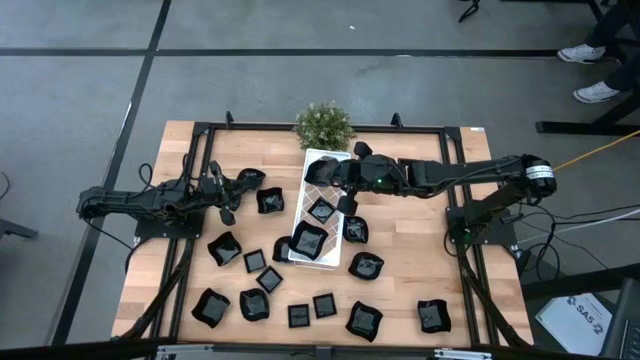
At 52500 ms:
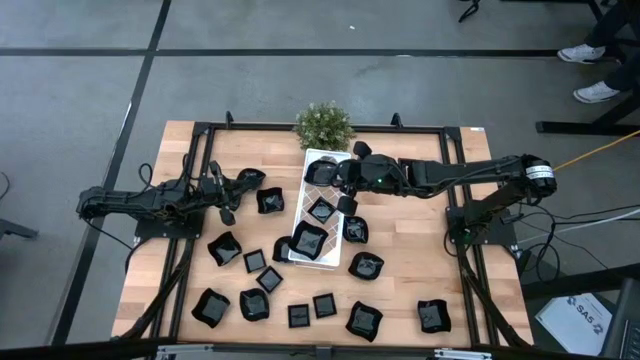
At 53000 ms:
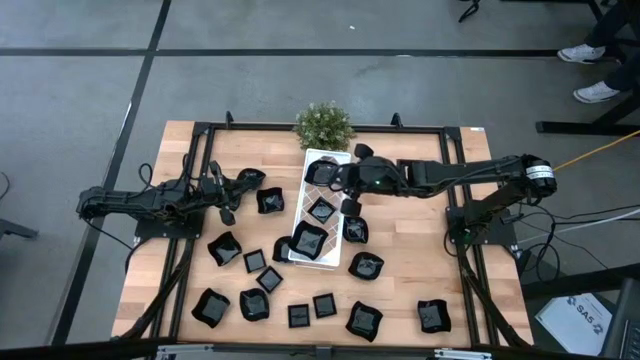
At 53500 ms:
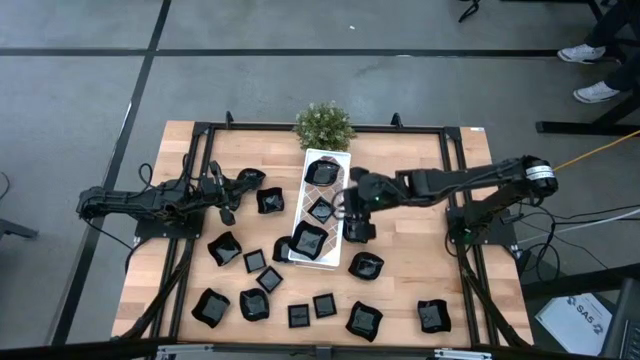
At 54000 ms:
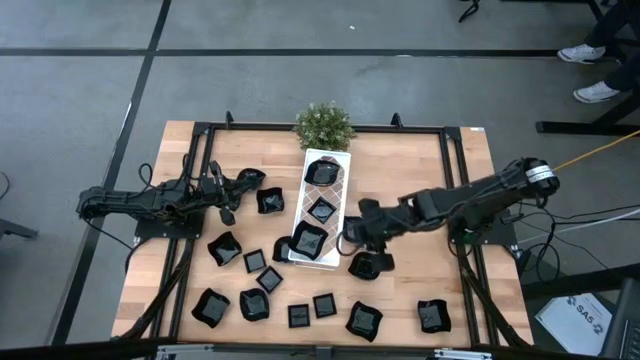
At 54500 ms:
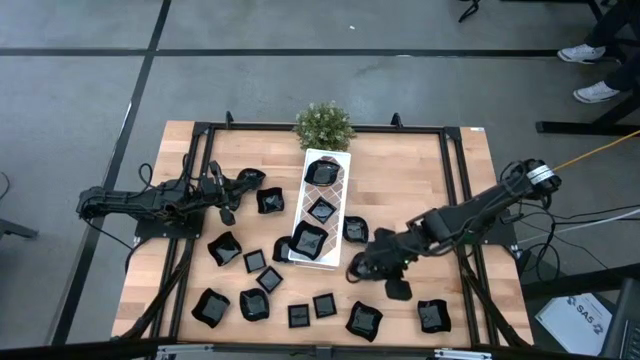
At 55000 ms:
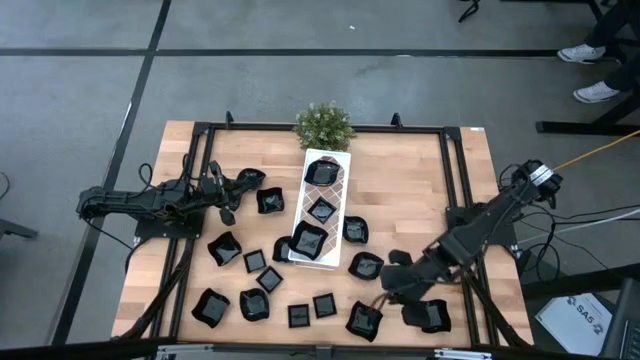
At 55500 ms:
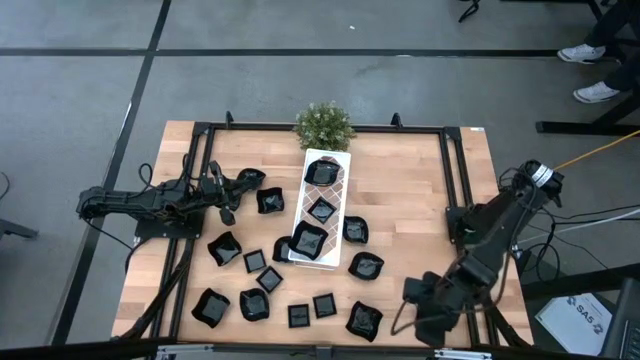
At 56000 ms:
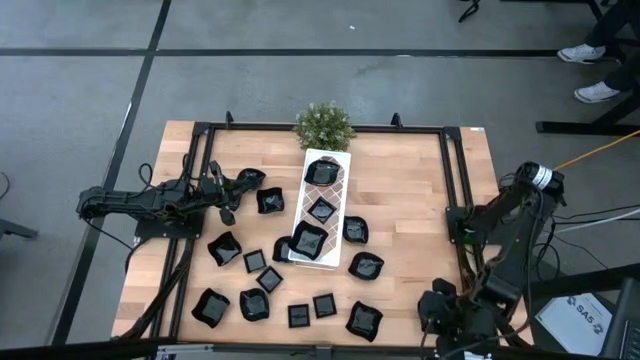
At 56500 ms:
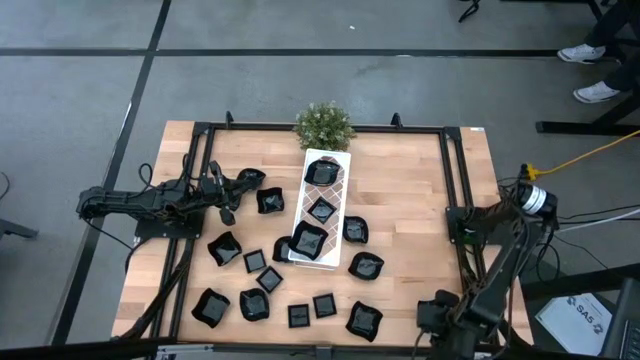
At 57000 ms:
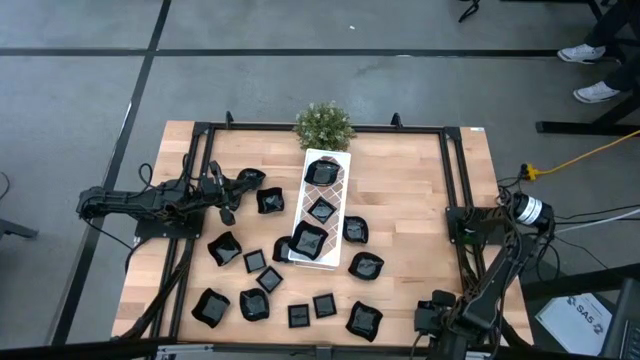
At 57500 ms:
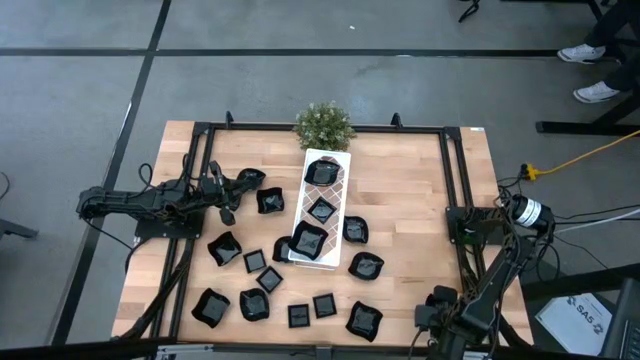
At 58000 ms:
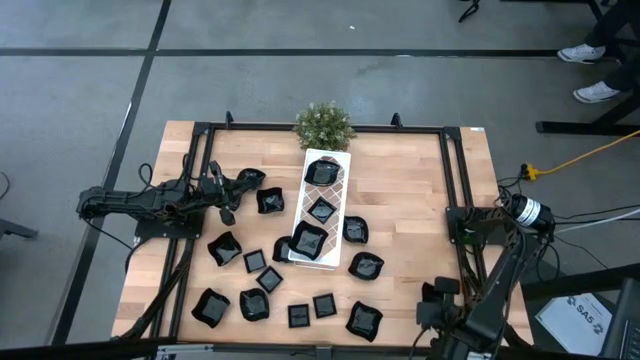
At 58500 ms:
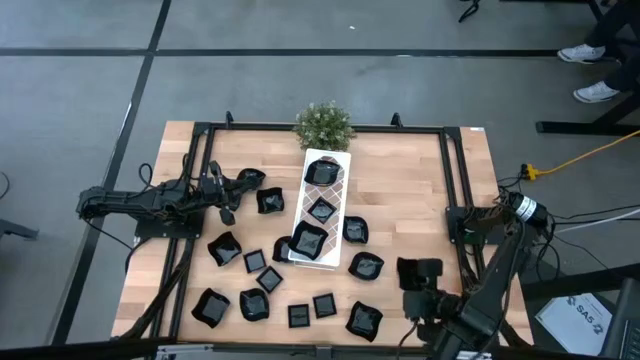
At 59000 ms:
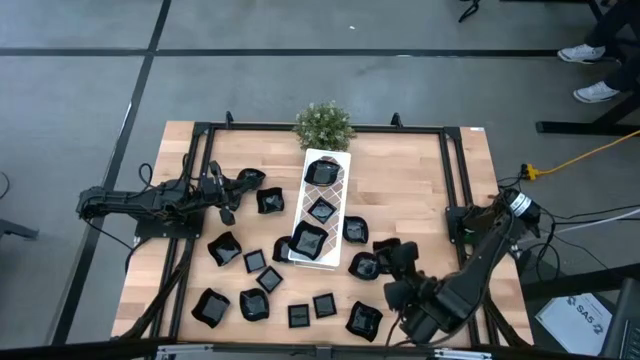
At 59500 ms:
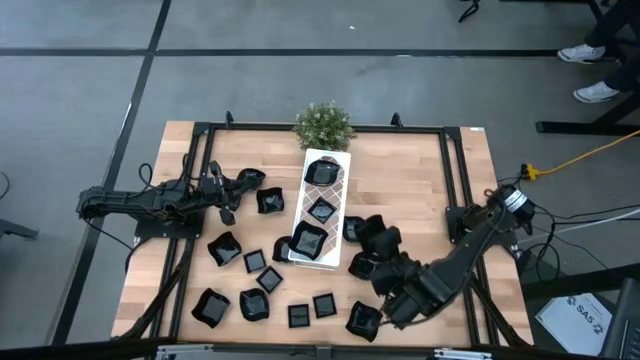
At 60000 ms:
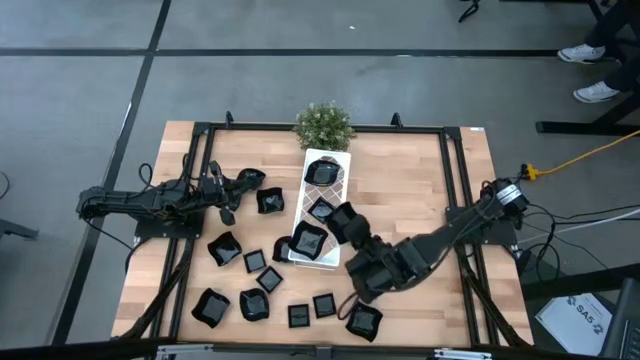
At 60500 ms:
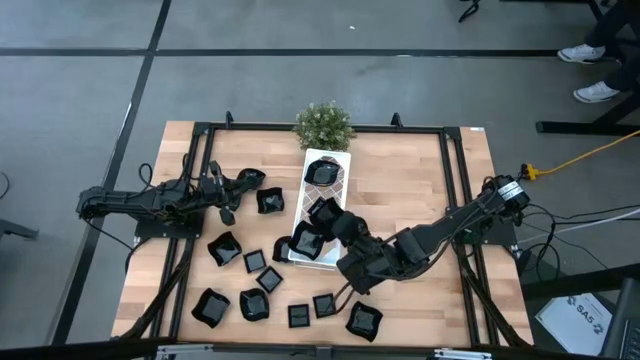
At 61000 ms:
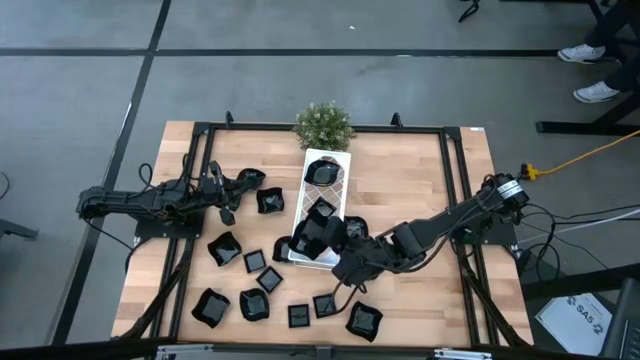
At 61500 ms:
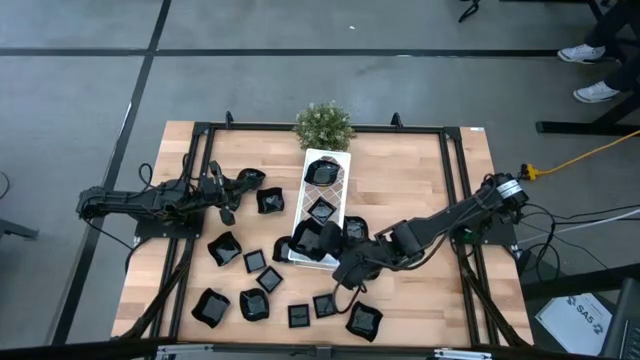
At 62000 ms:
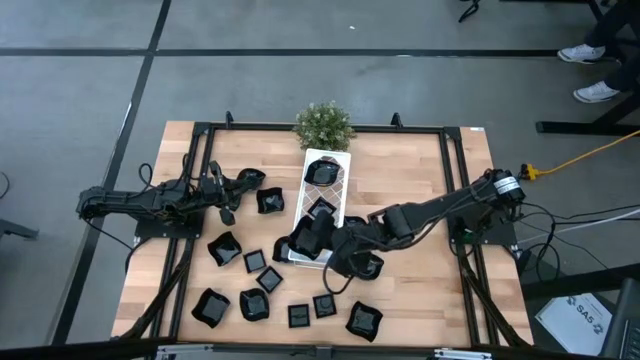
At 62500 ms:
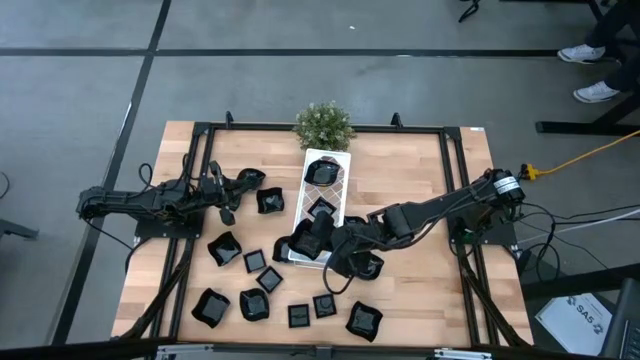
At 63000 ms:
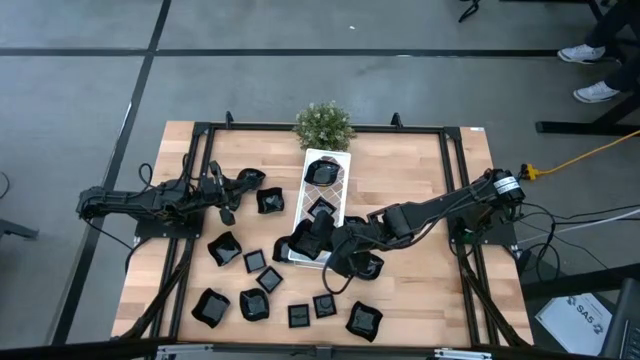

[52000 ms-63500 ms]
Task: Pick & Place Mini shaped plates
Stack the distorted square plate on top of the distorted square plate on the shelf

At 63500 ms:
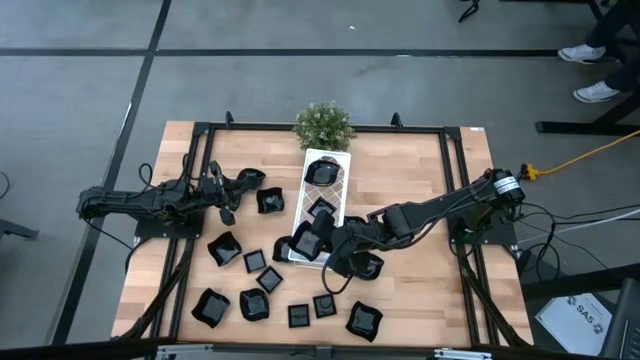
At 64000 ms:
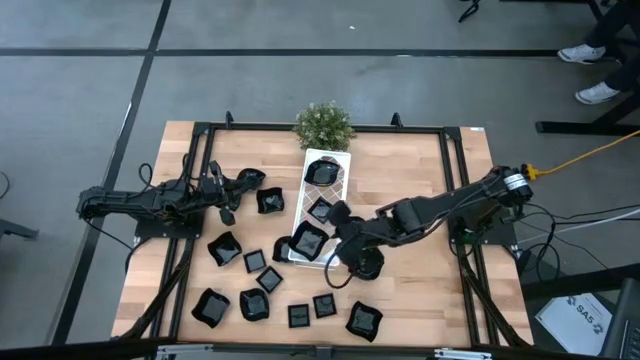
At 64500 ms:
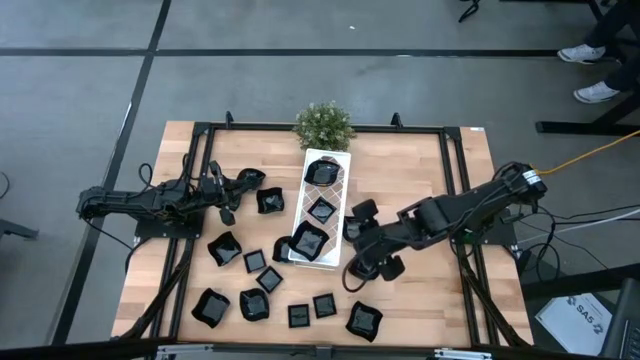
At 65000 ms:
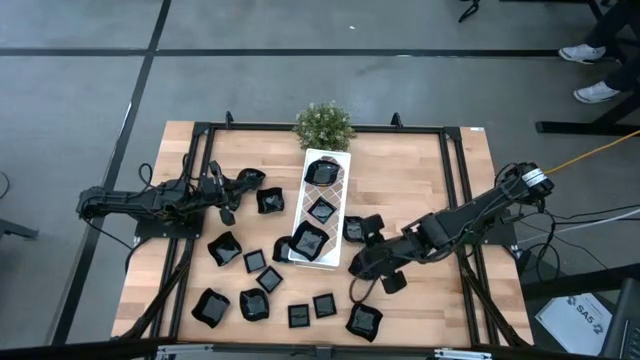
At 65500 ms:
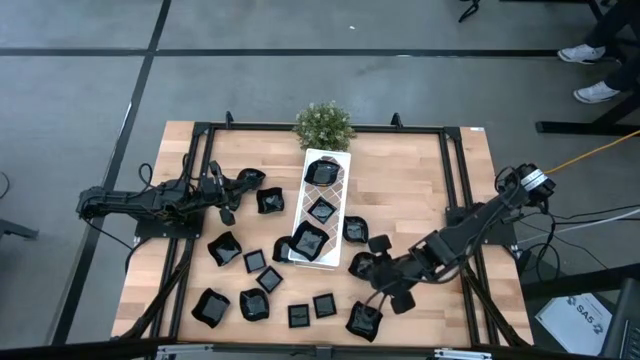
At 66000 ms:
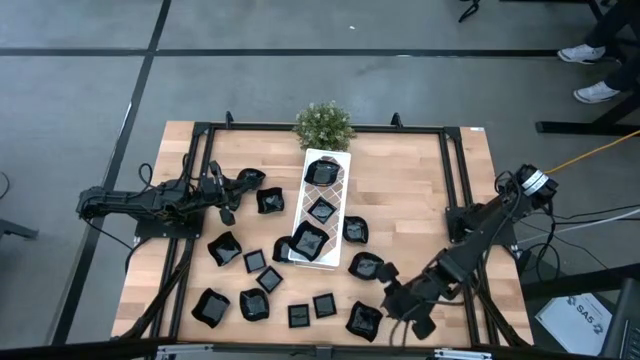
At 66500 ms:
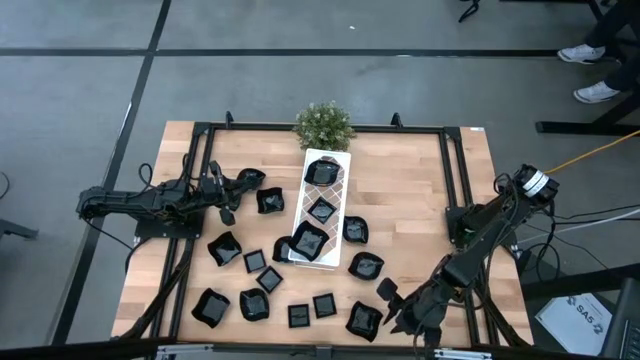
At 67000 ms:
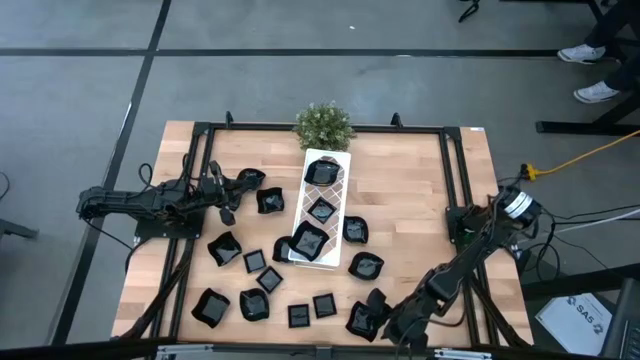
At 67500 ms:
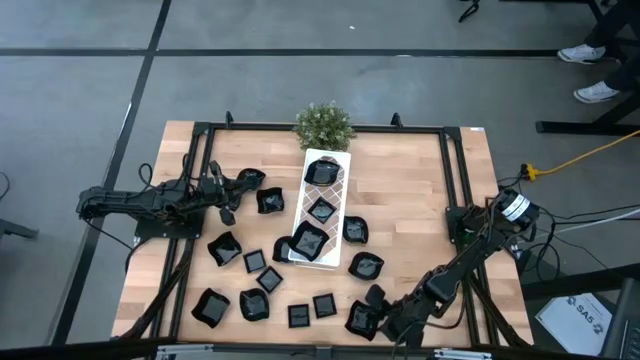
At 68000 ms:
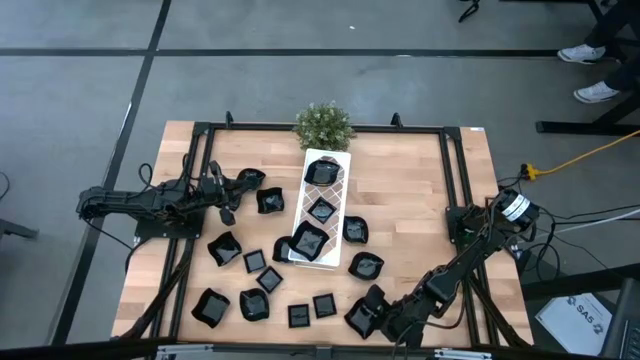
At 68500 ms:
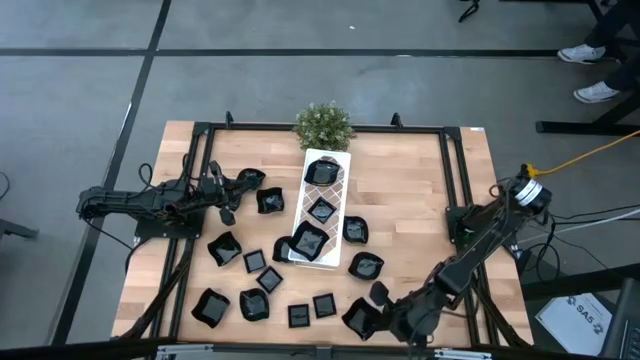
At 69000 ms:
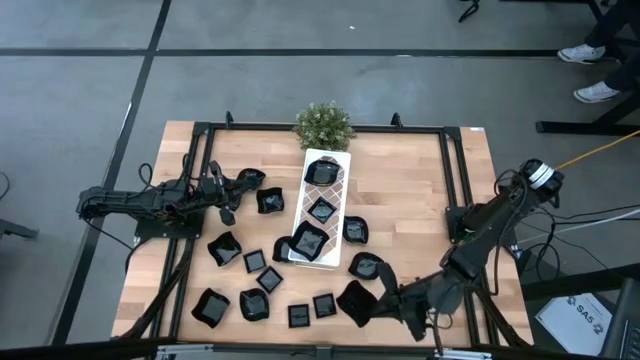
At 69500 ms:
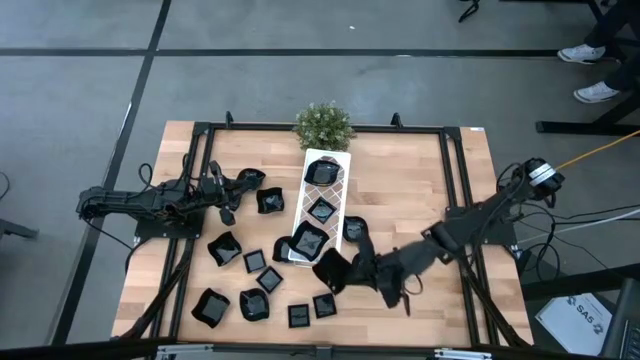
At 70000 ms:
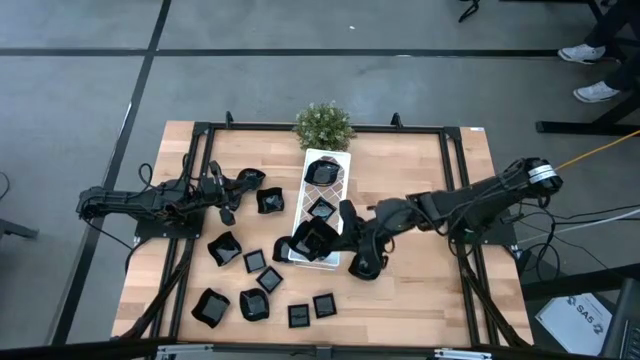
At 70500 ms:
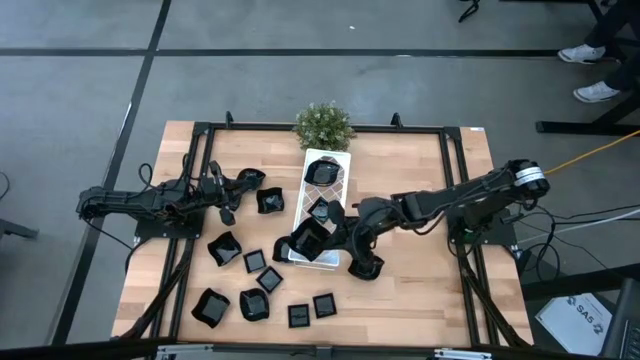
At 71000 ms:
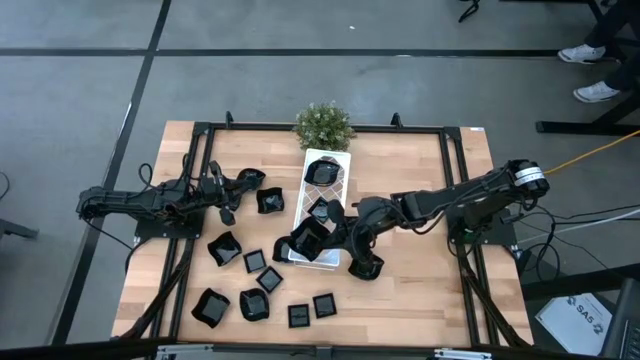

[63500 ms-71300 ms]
Stack the distorted square plate on top of the distorted square plate on the shelf
